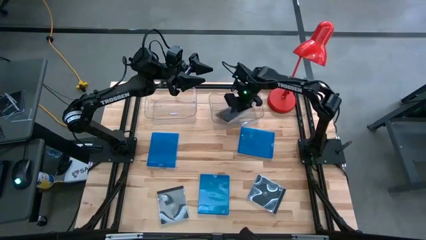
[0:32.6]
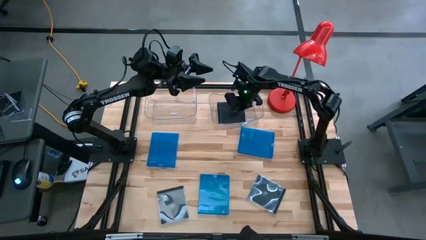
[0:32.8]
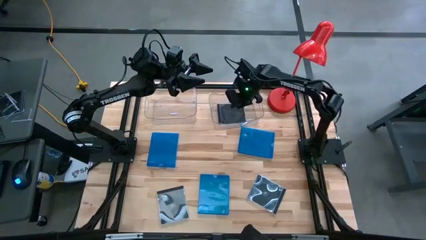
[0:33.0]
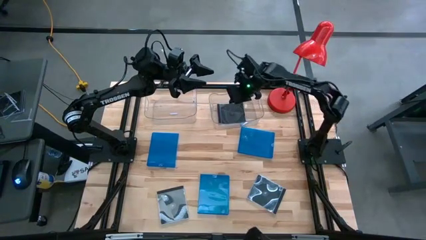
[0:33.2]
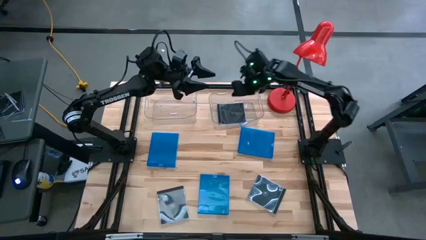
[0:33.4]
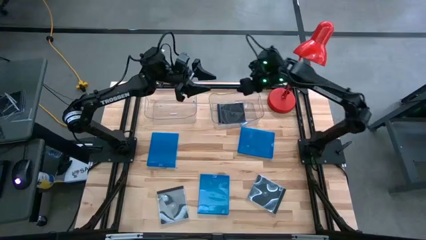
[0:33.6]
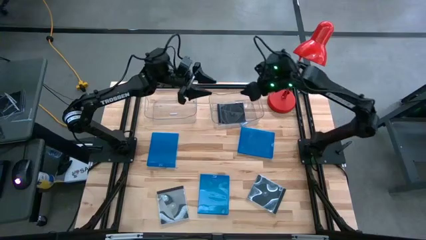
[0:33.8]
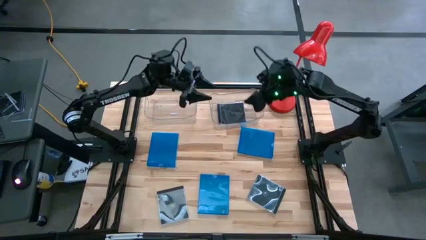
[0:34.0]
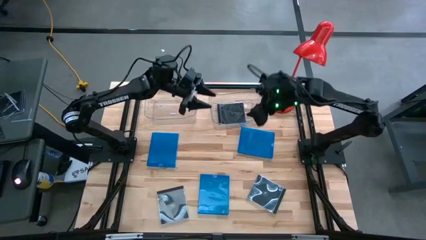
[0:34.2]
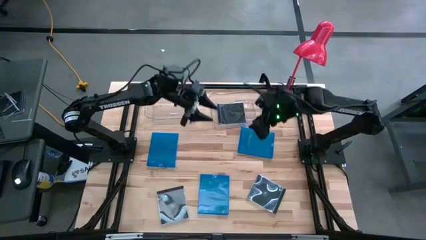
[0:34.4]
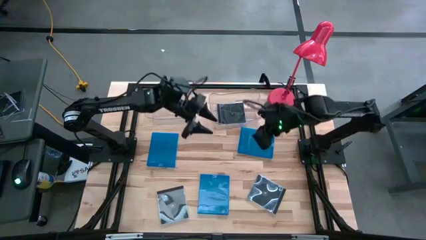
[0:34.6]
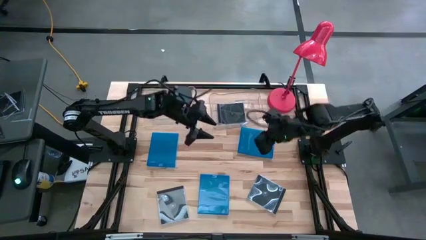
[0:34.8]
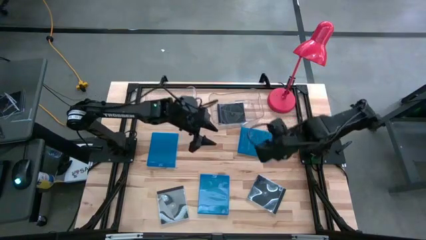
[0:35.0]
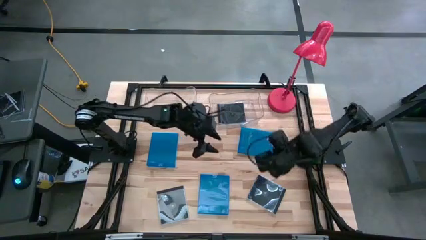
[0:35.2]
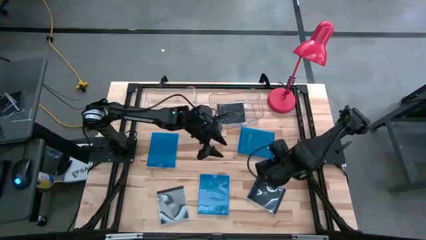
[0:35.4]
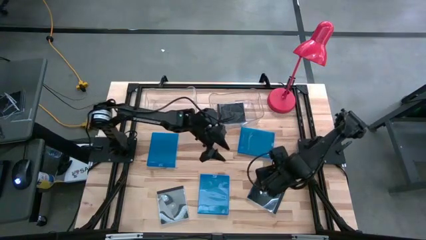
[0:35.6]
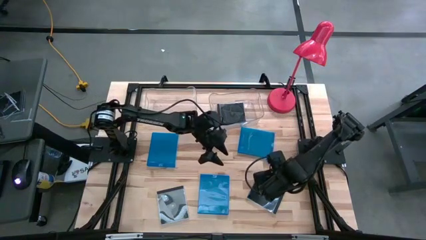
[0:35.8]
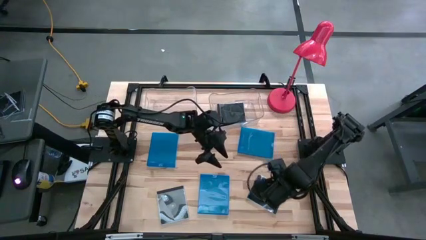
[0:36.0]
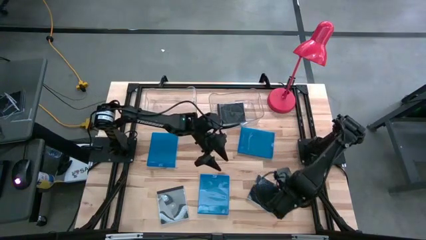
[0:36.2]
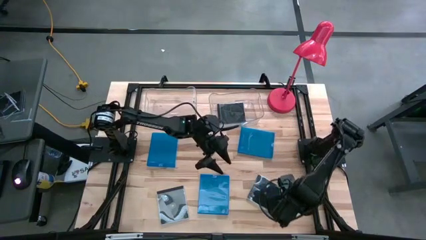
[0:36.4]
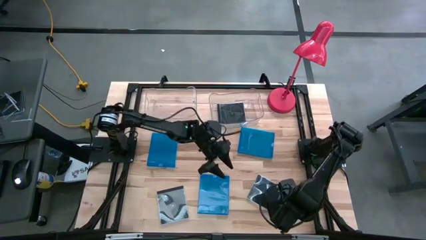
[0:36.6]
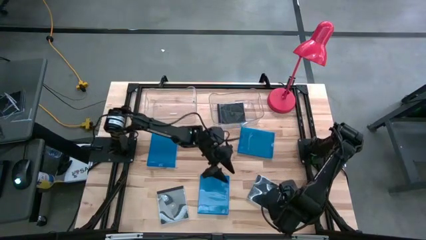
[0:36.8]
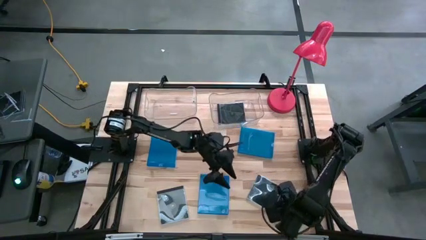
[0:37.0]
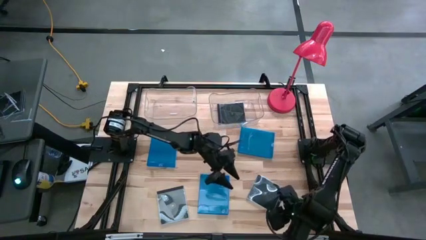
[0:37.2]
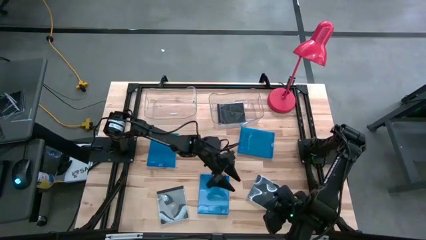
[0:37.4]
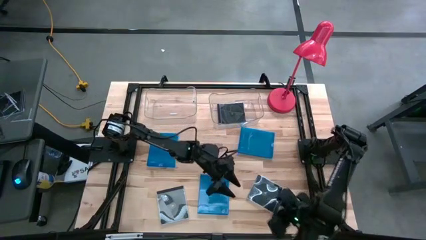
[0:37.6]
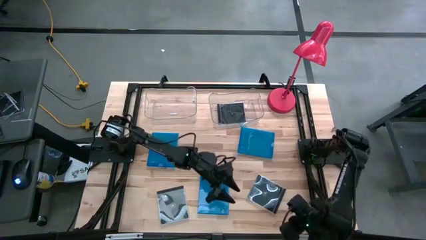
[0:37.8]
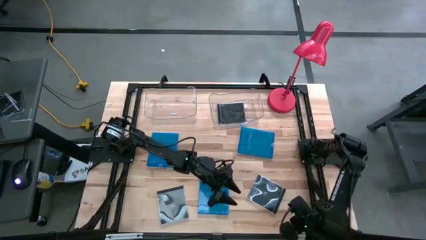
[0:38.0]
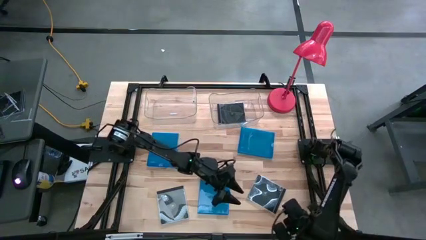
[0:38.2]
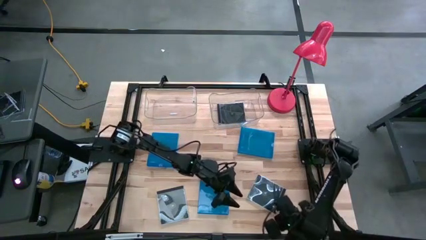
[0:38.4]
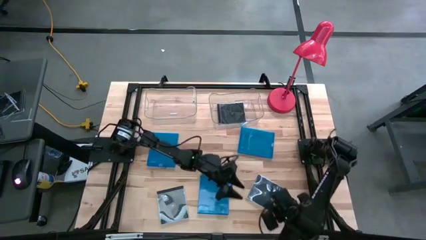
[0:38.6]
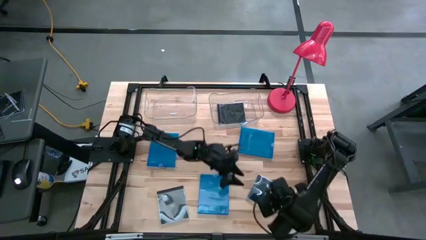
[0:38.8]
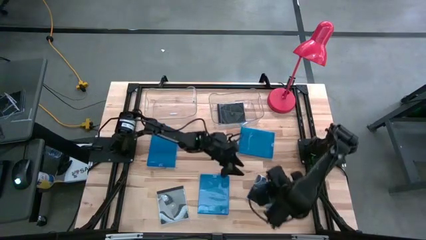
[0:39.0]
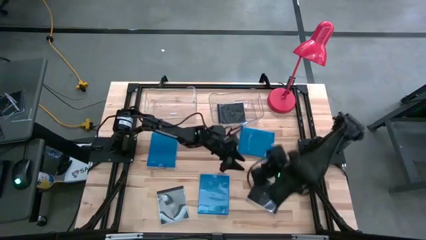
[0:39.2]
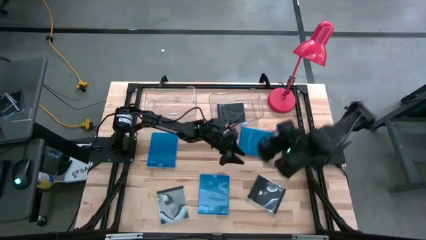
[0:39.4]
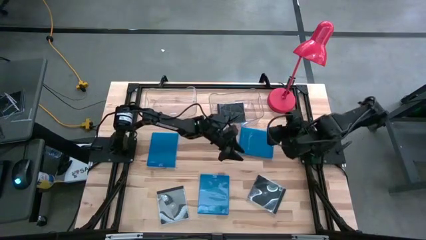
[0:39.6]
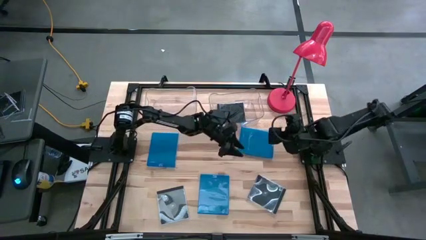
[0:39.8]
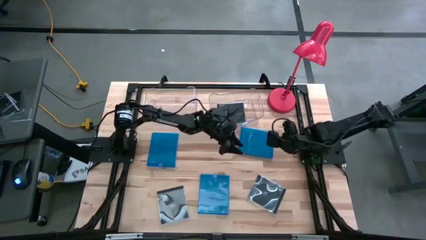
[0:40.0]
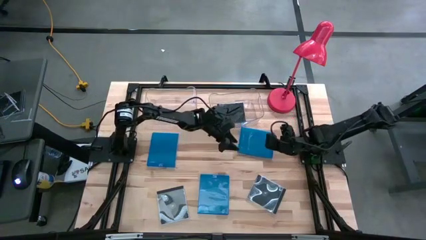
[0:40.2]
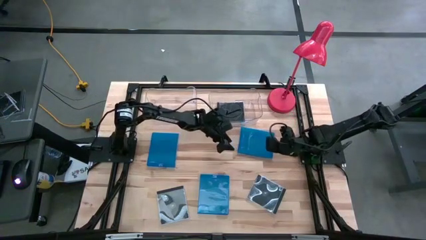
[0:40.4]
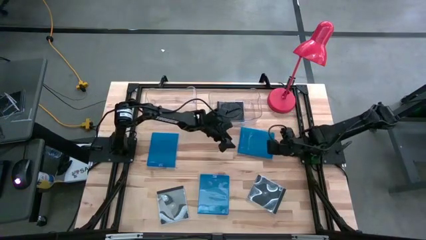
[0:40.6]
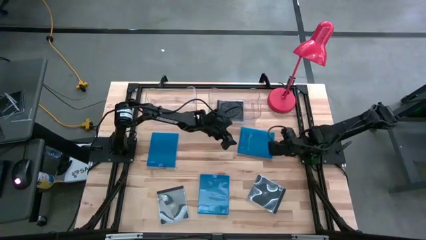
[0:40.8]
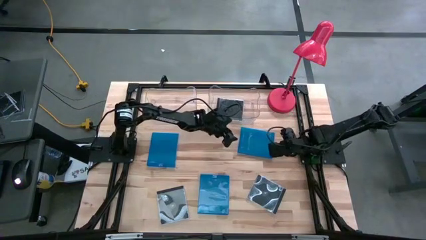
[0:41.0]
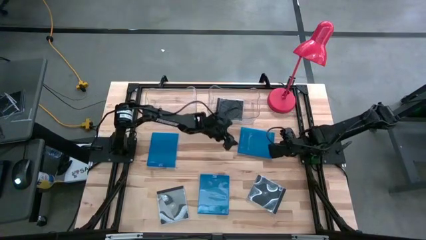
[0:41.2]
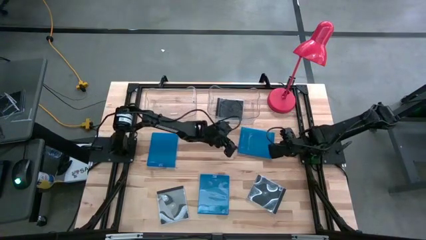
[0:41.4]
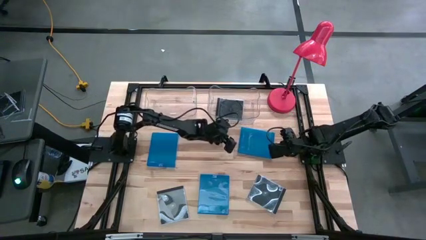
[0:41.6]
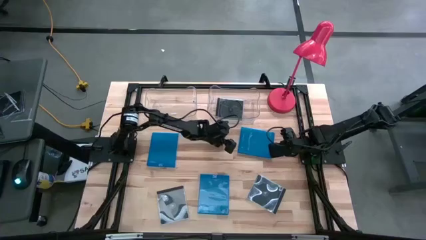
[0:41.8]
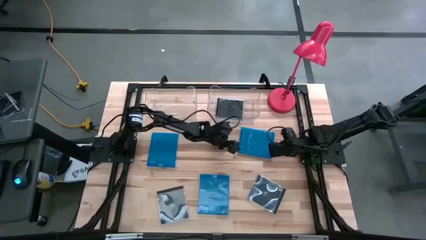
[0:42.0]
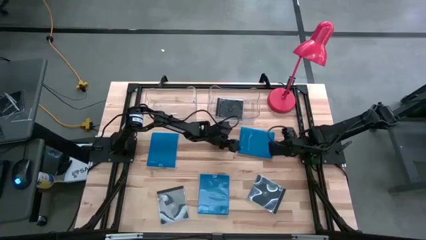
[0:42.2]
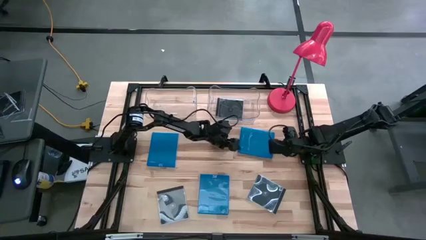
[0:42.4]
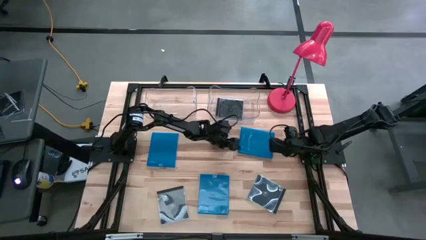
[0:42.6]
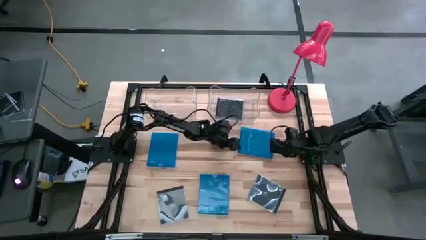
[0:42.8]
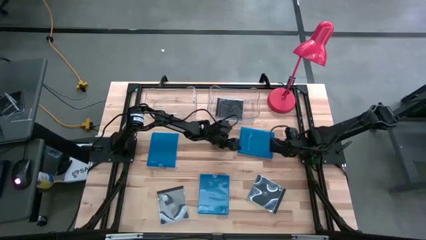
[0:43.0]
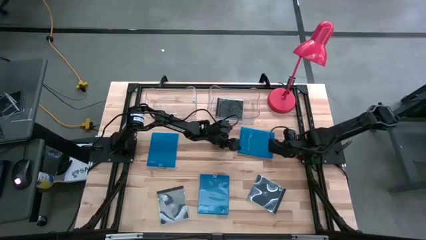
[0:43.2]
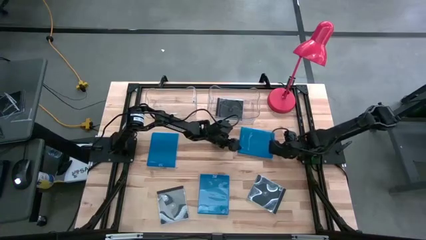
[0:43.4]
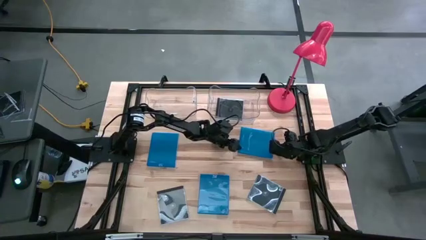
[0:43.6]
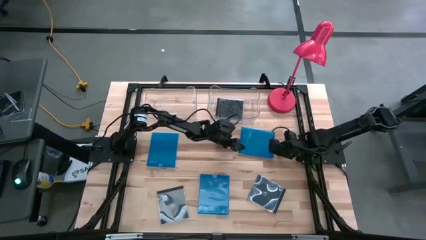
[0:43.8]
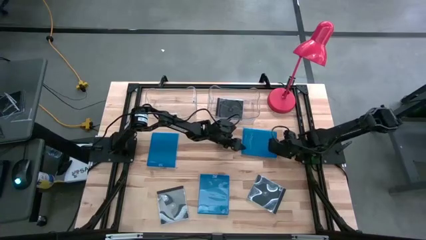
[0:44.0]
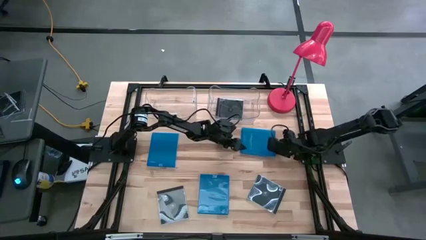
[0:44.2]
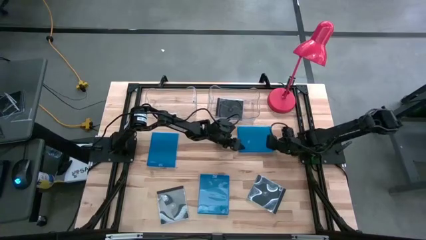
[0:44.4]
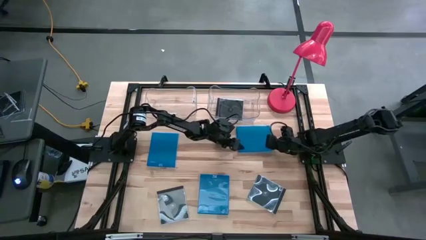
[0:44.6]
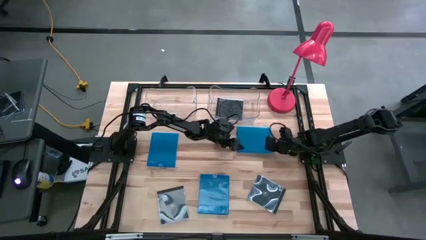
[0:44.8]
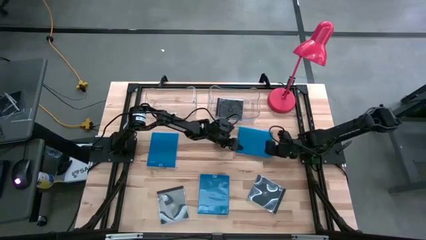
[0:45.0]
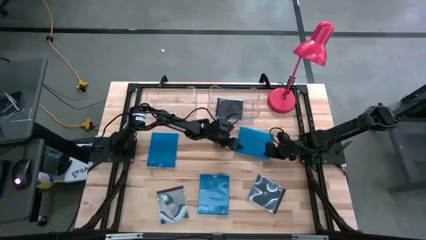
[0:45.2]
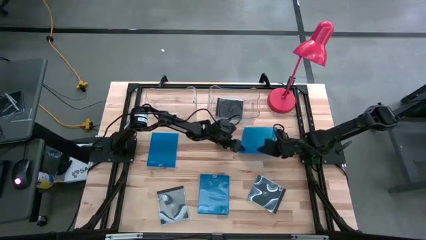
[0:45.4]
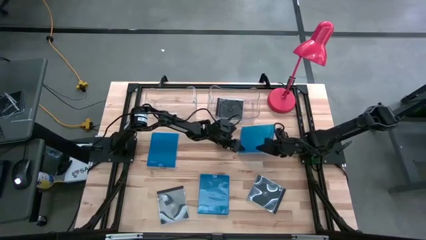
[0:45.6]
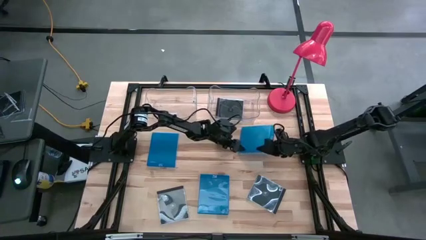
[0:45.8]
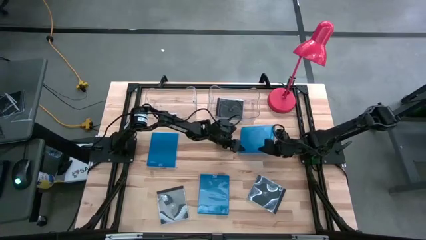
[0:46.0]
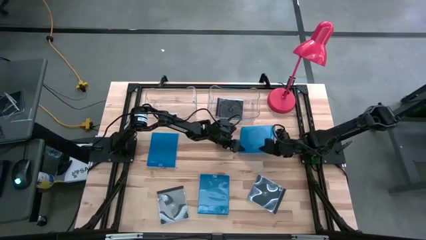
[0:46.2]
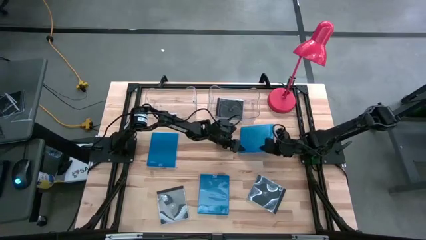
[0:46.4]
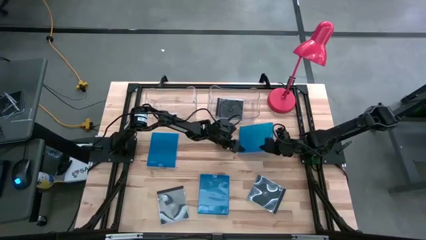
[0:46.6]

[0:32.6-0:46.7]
Task: Pick & place jewel cases by type
Put the top right blue CD case into the left transparent bin

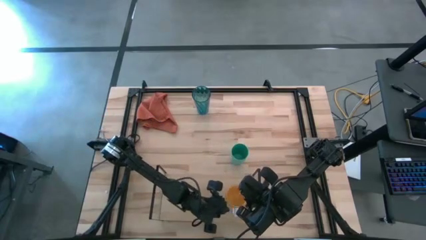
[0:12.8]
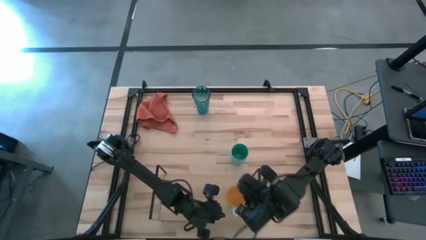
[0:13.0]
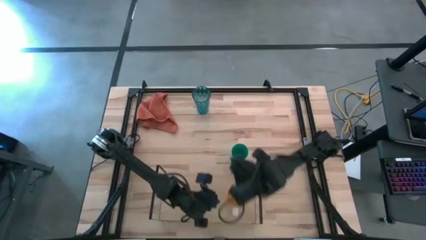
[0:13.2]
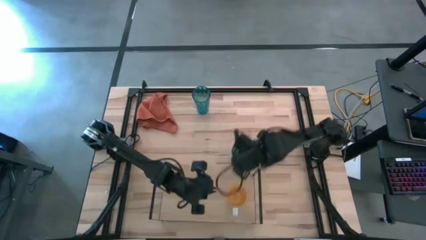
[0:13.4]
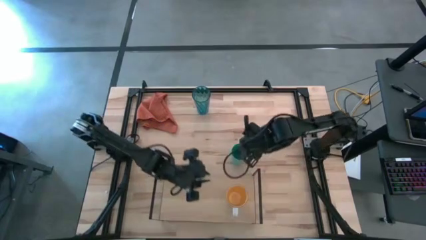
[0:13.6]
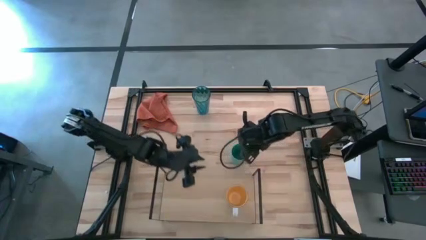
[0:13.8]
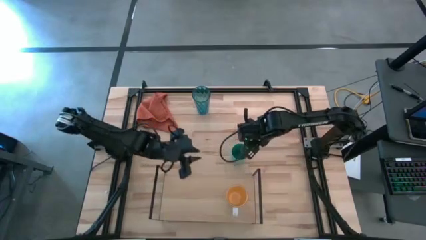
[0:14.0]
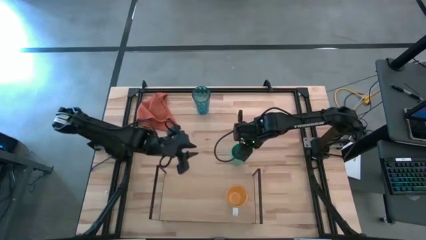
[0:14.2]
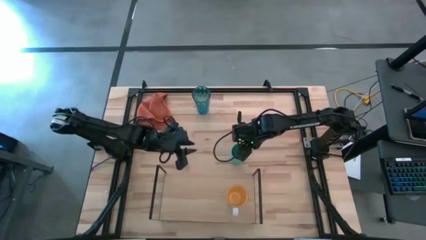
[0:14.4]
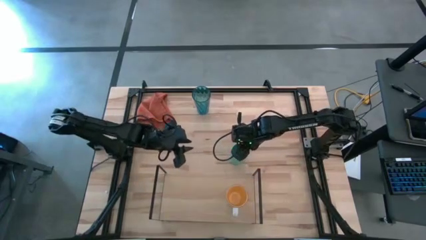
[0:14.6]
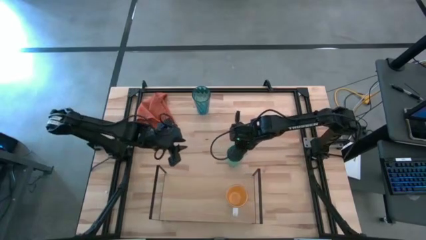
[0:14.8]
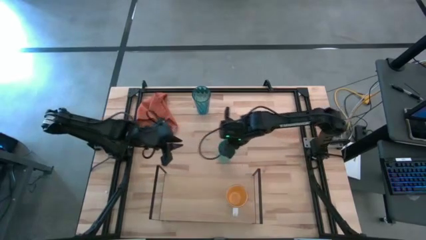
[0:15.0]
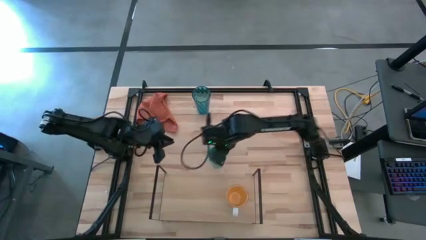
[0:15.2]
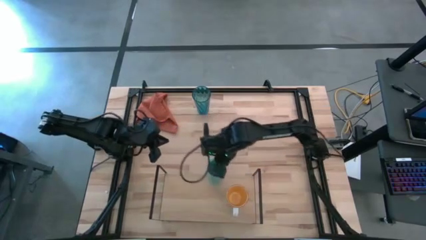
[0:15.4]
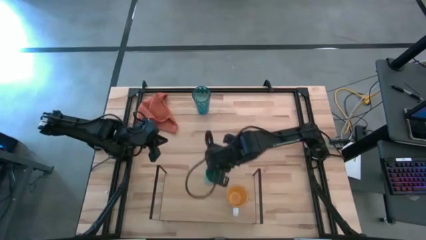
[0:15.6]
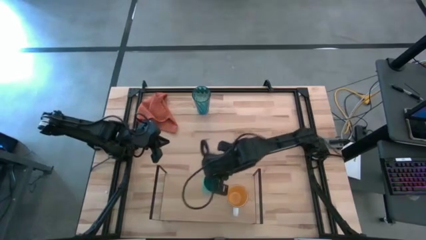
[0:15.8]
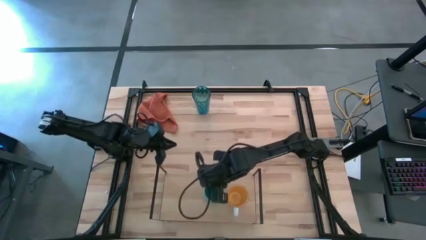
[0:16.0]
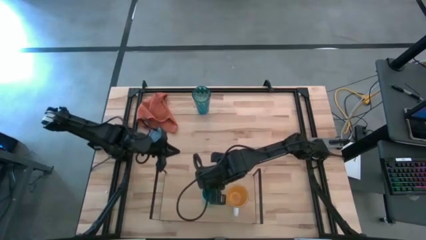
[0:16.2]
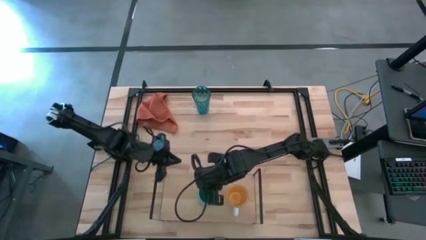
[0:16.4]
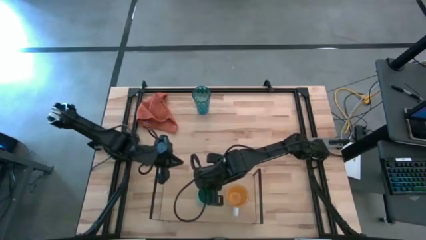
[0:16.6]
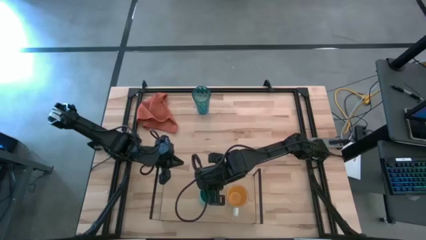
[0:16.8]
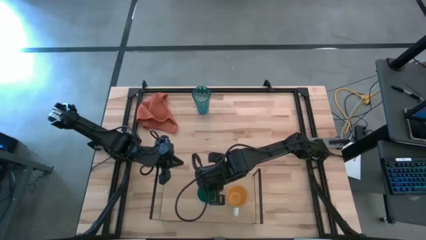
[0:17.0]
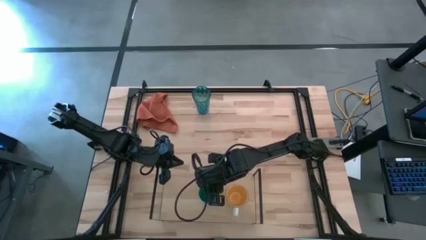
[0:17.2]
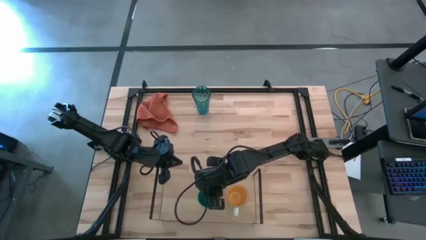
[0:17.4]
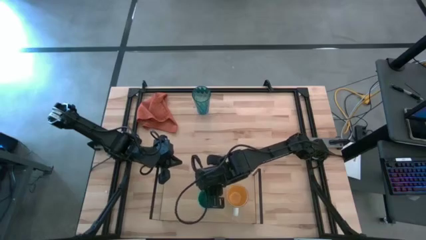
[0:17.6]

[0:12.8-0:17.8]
Task: Stack small to large cups/mugs on shelf
Put the blue cup on the shelf
